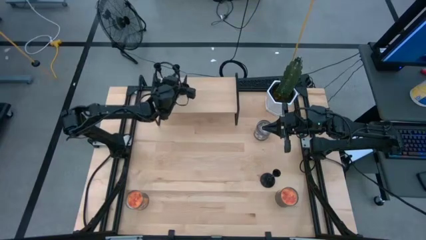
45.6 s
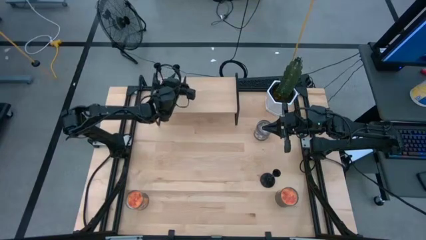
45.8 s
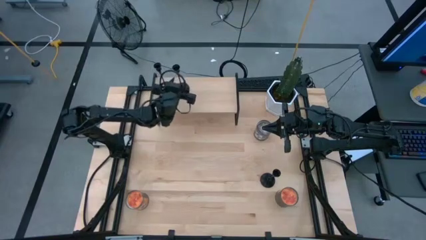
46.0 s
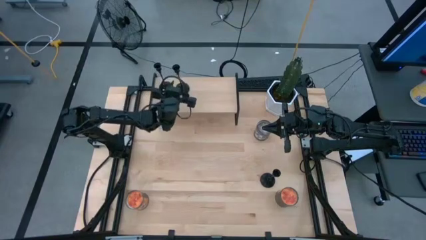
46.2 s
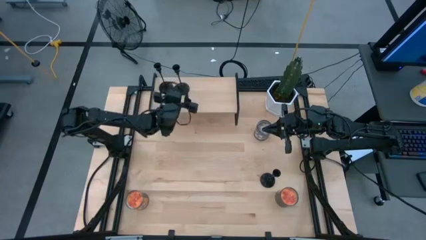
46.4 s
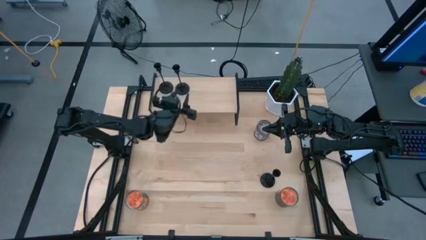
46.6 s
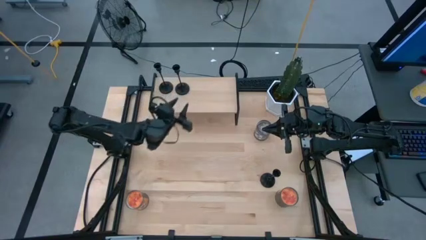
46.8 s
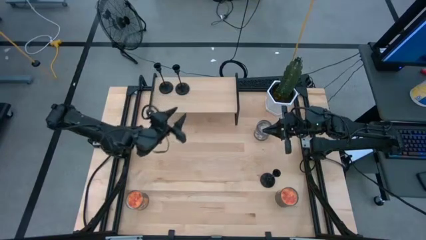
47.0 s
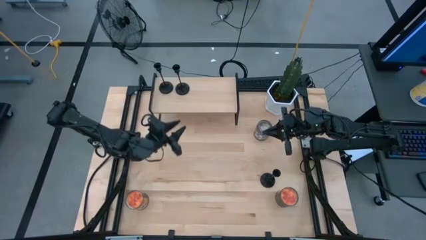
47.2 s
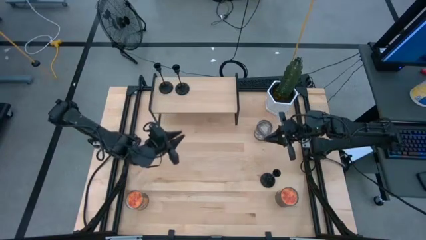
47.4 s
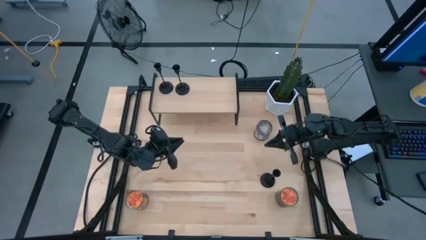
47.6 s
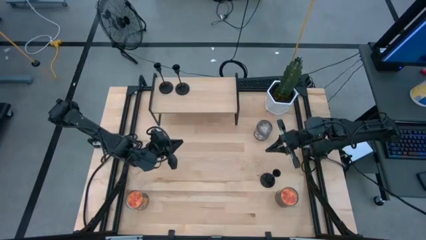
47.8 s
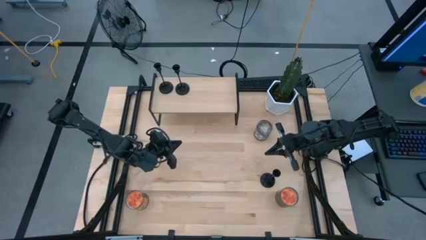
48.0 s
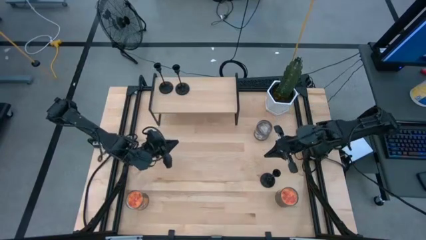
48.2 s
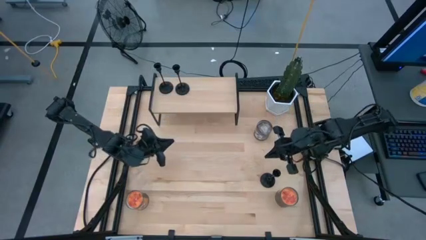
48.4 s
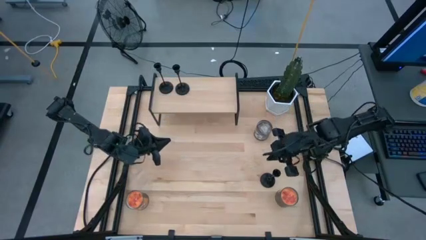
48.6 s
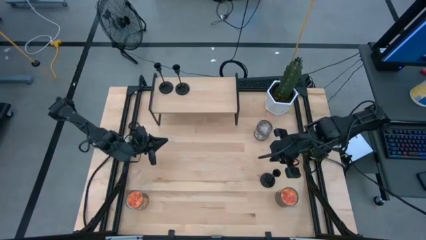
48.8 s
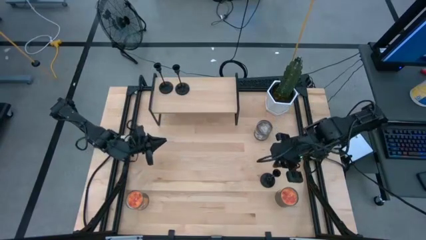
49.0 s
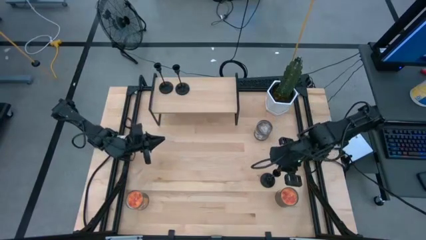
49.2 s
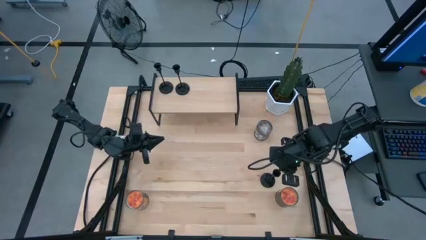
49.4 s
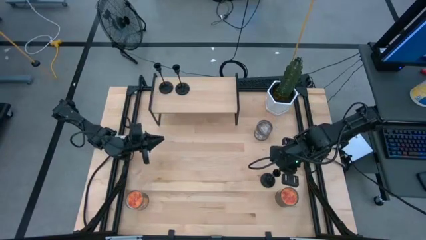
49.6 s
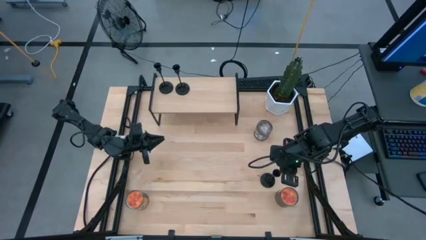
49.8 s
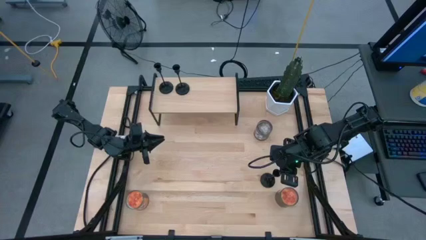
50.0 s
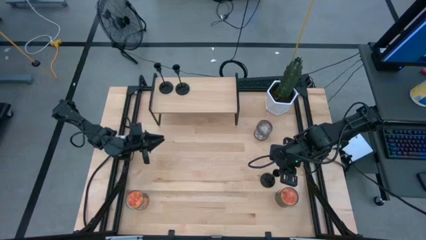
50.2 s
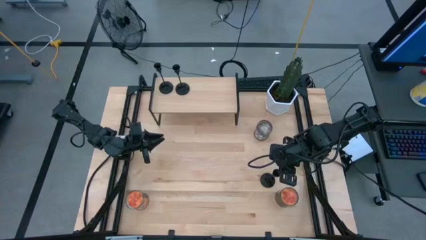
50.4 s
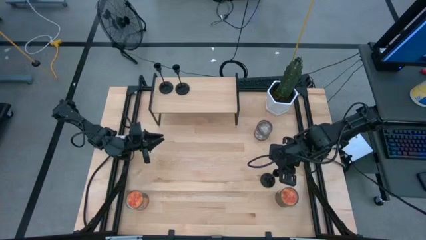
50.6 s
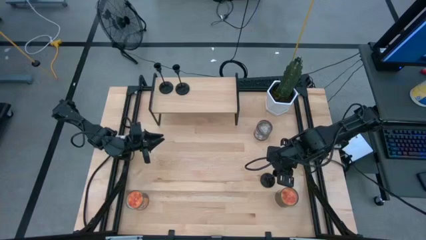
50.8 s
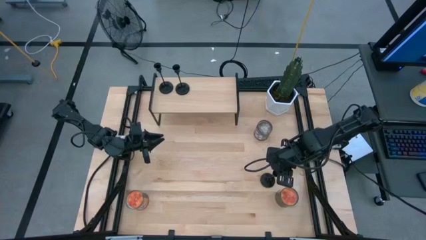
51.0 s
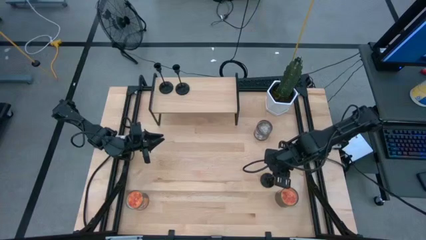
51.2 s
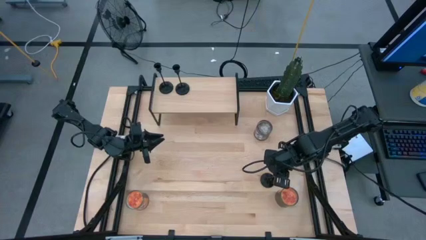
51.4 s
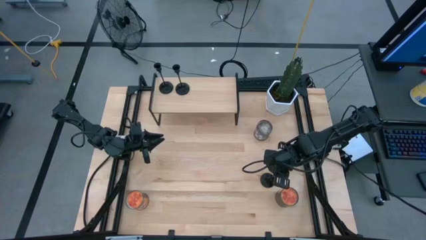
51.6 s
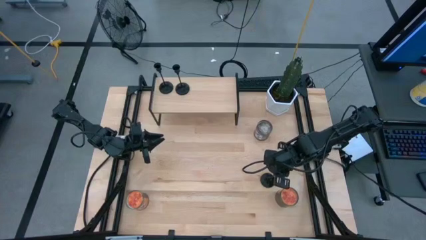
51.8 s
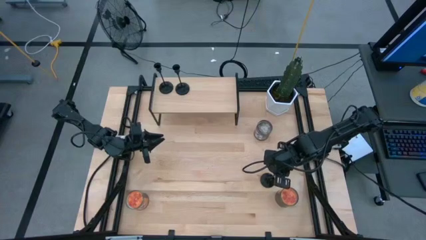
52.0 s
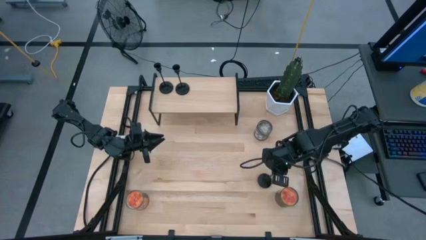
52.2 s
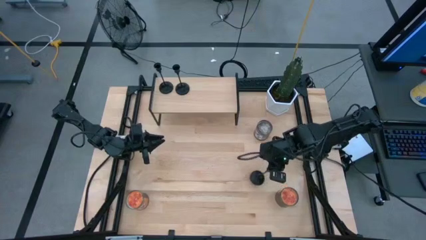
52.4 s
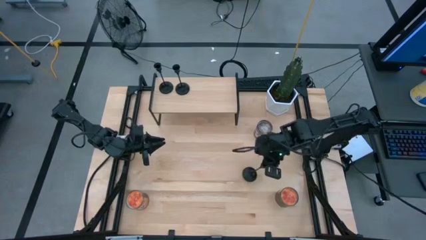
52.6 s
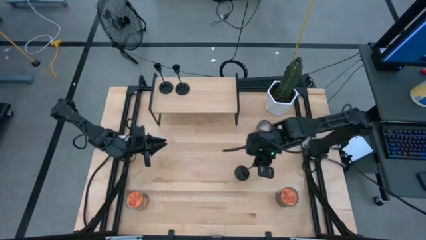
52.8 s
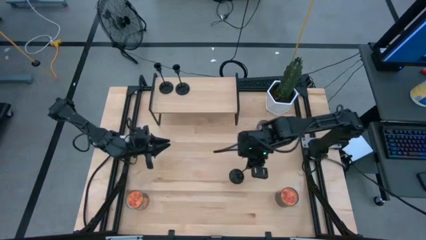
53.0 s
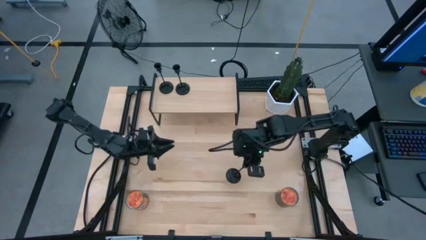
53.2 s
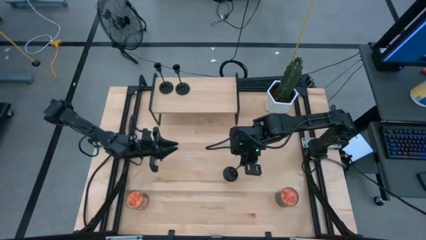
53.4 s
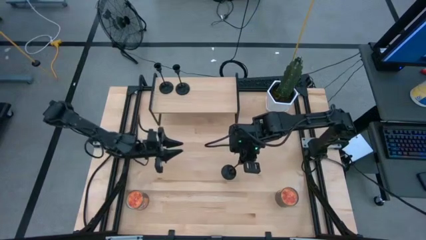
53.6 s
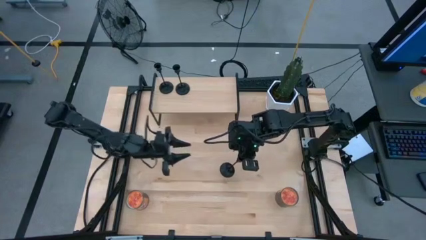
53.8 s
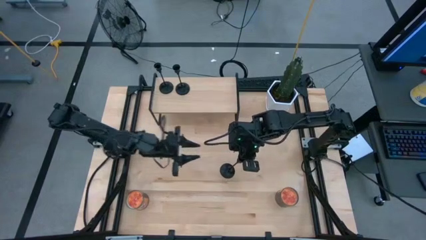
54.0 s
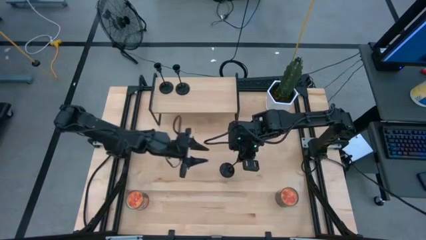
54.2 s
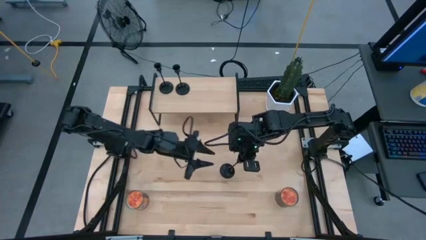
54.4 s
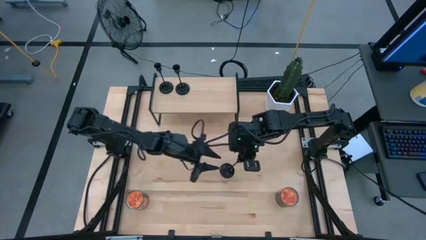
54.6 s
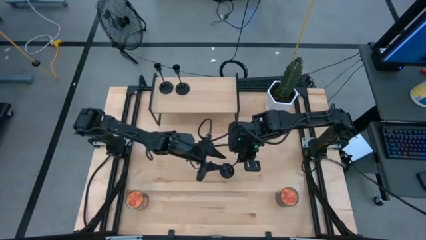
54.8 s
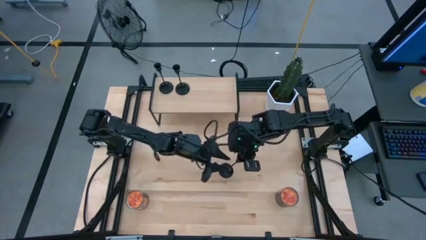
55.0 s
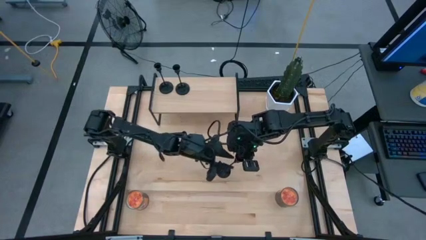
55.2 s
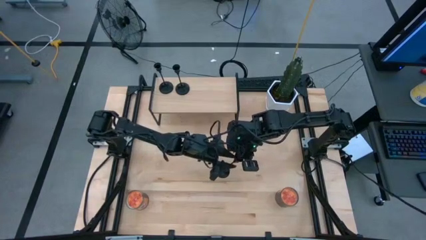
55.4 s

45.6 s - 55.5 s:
Task: Pick & Place candle stick holders
Put the black candle holder on the shelf

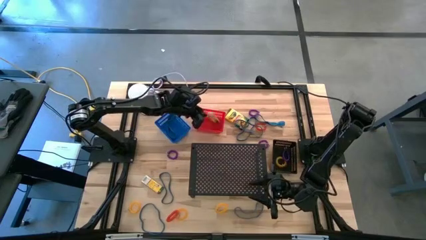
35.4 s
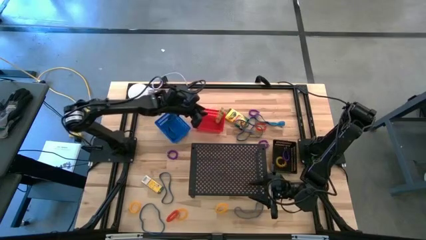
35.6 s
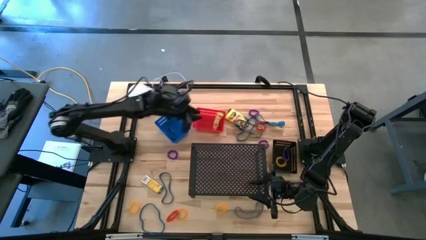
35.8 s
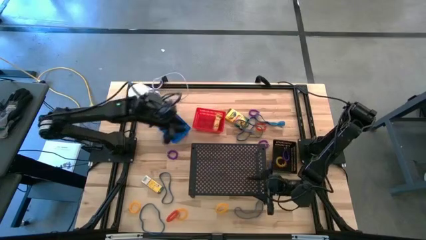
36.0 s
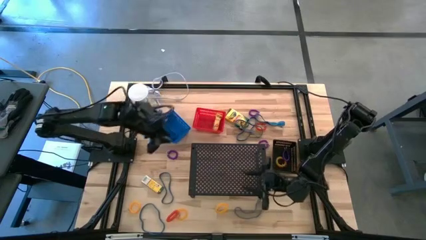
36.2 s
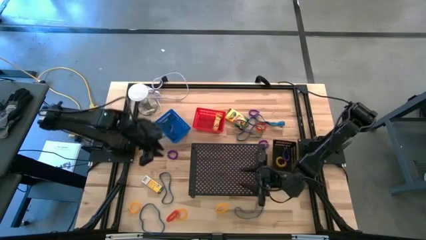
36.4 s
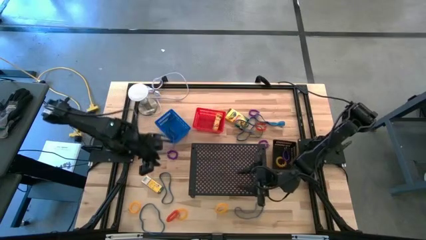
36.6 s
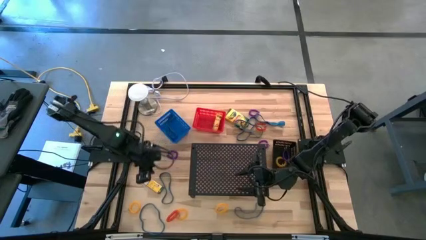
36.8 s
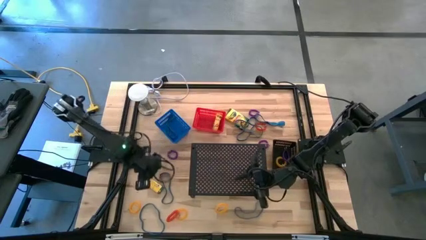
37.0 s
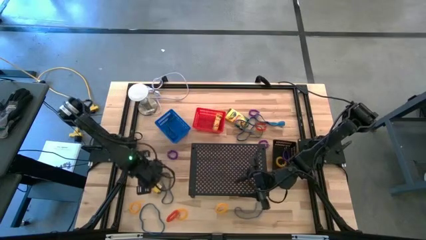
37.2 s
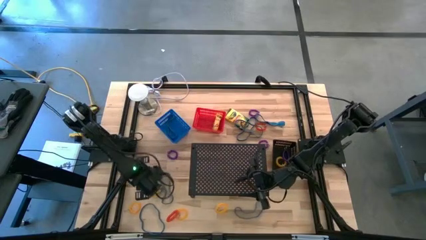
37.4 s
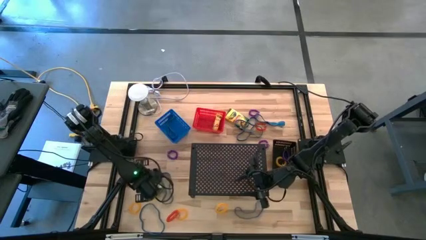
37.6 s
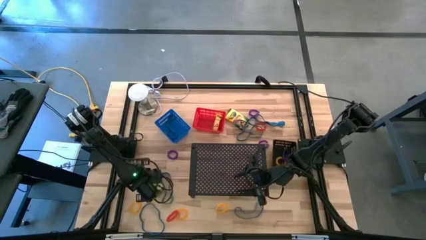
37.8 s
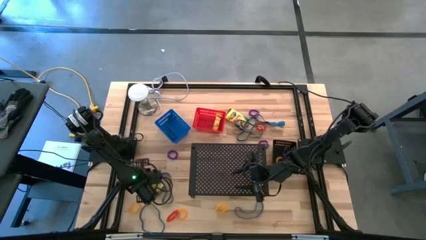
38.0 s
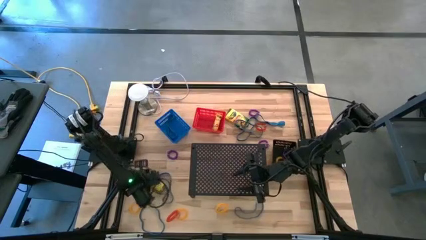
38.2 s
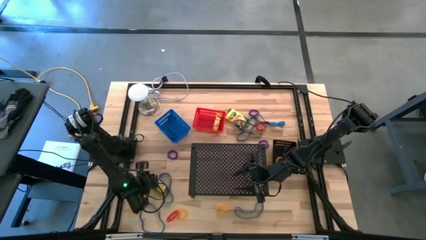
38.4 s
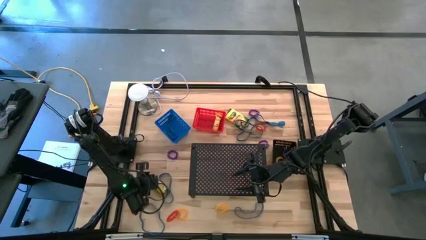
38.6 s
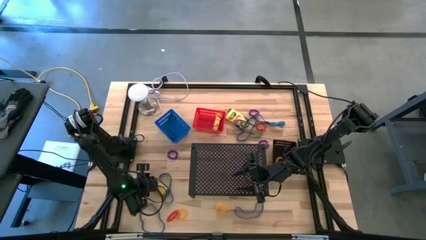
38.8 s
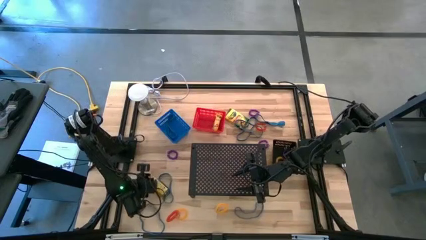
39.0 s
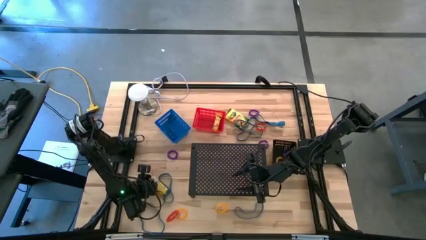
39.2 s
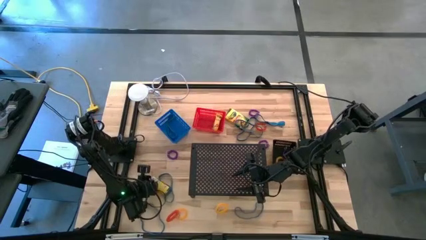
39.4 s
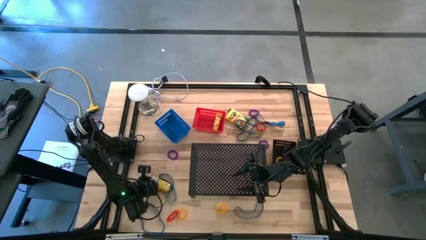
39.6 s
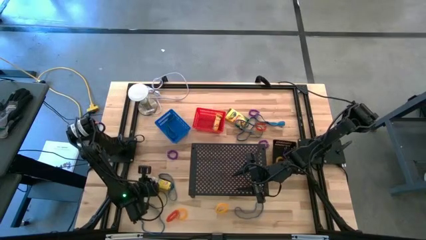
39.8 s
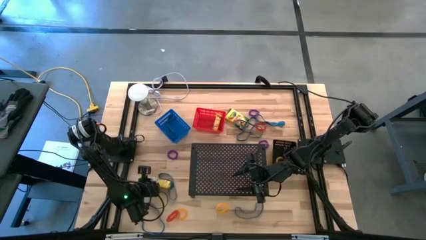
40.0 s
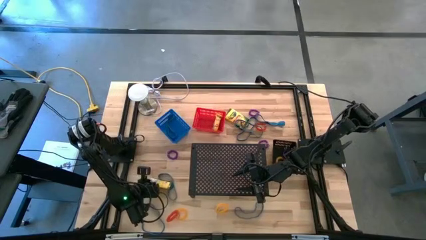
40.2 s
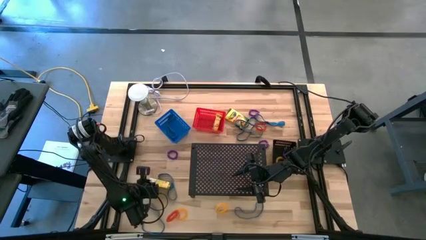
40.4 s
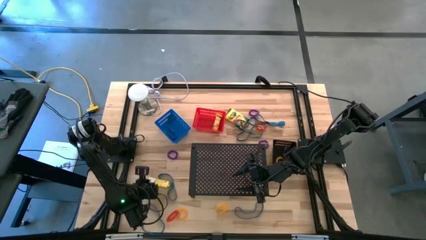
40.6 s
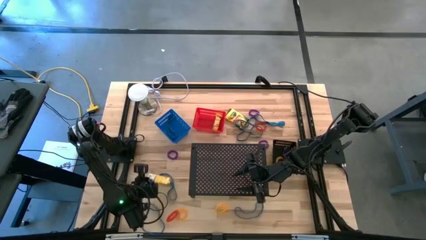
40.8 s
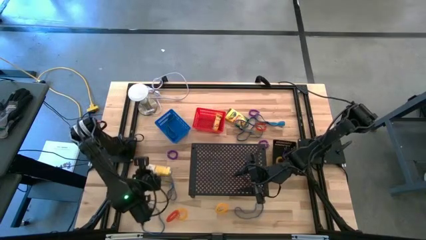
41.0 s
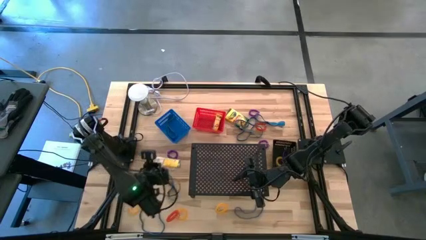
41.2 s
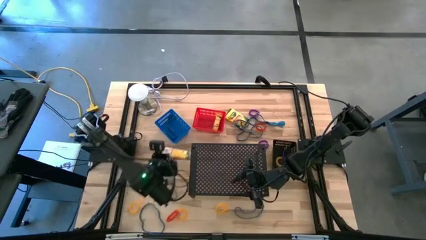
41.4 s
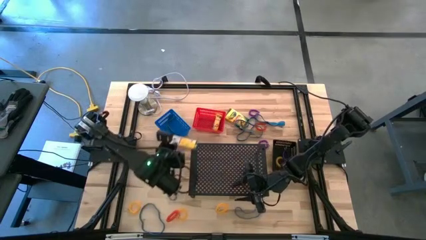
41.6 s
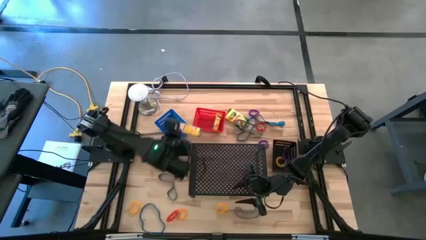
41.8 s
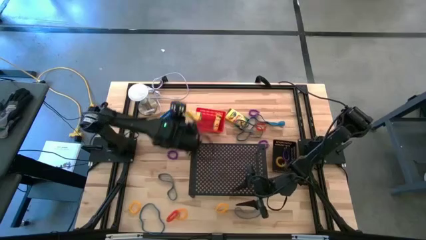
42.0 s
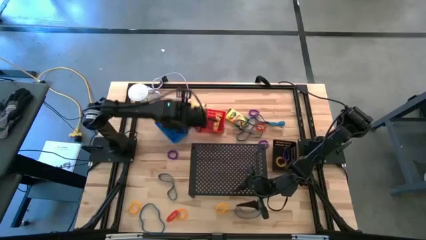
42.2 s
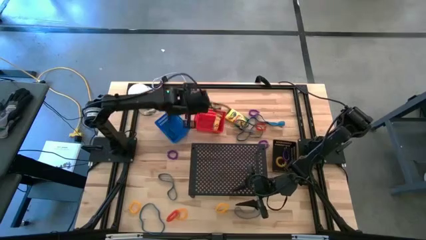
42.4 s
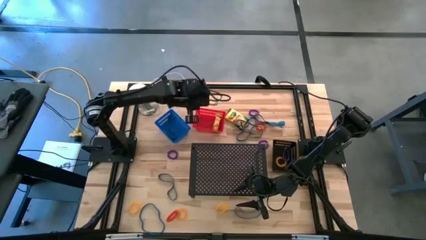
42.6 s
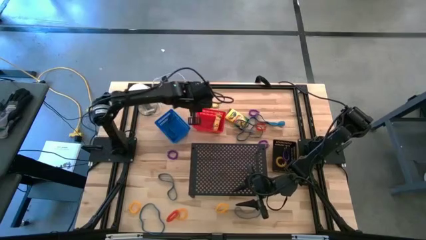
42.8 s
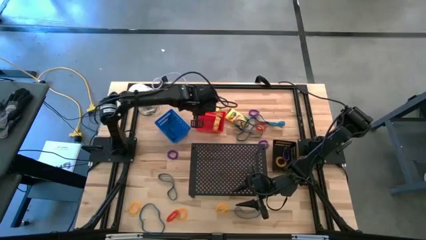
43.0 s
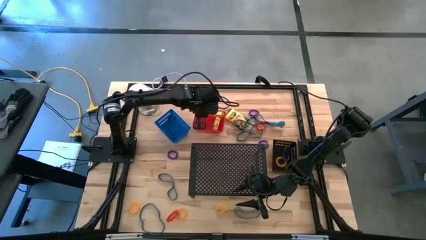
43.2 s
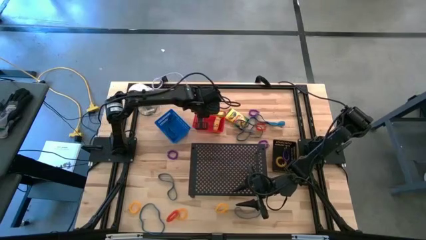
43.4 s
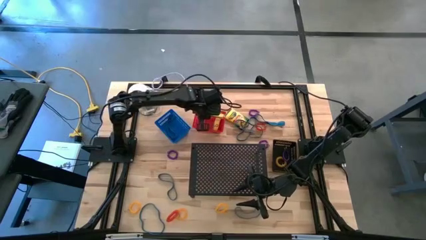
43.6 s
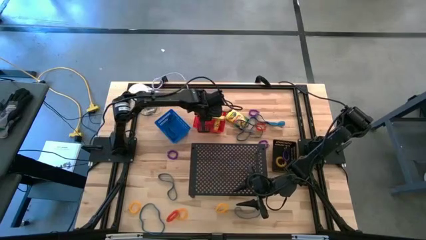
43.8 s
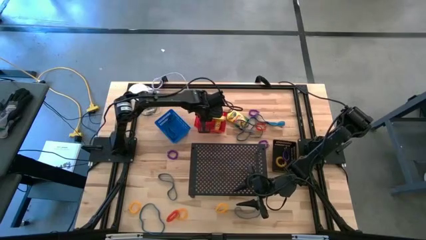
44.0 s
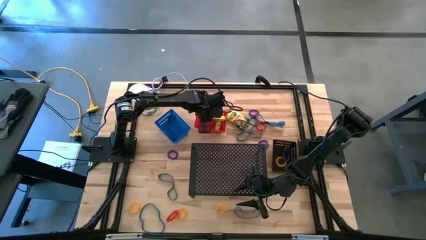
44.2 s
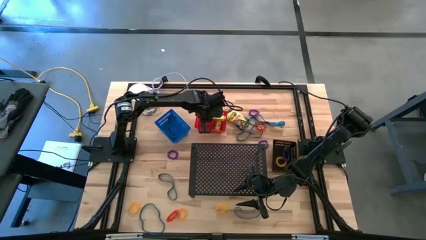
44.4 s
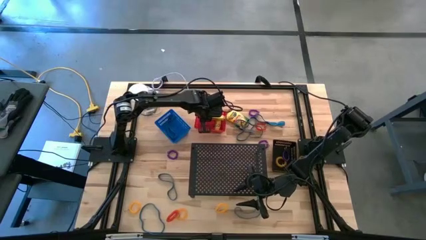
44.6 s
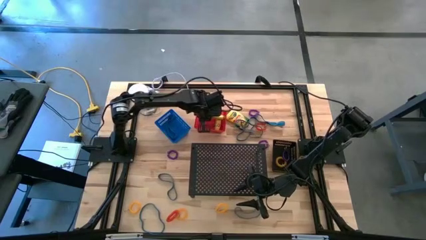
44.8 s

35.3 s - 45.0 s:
Task: Pick & Place Office Desk Supplies
Put the yellow crayon box into the red bin
